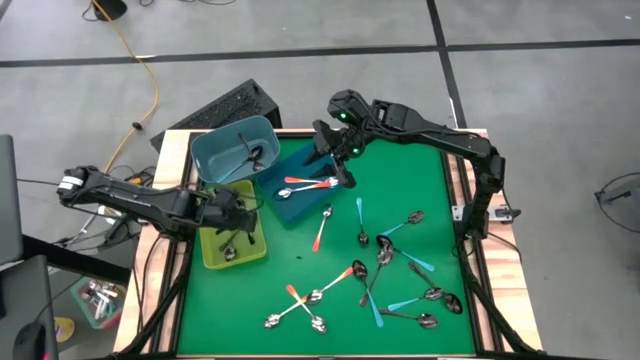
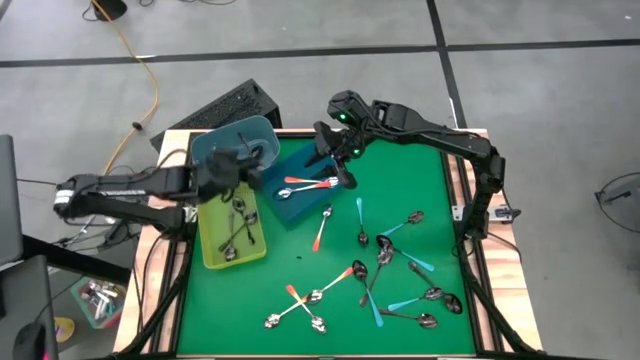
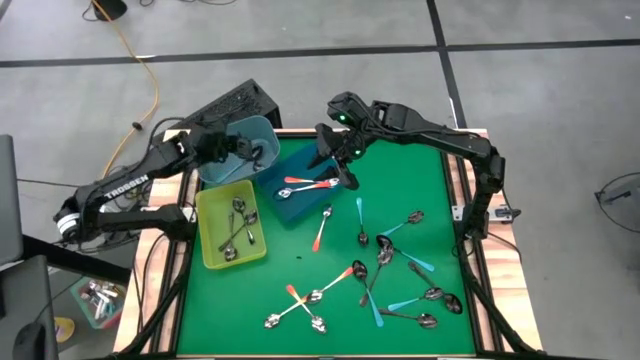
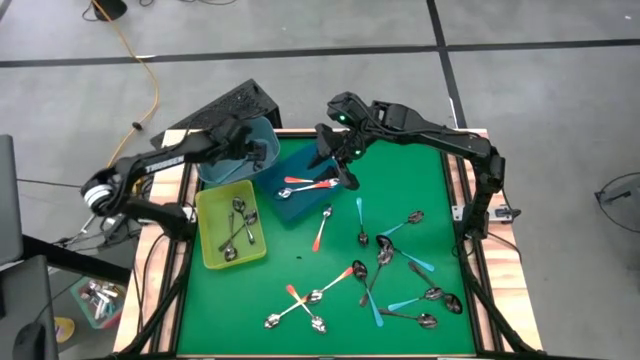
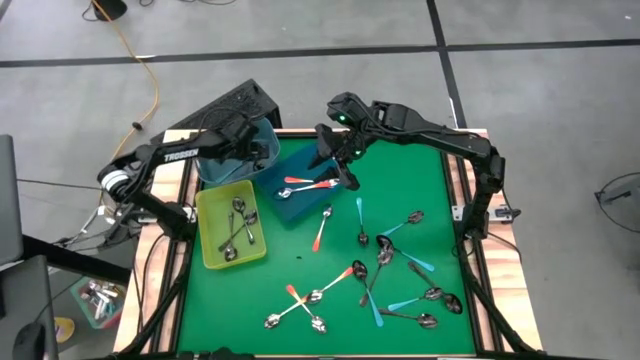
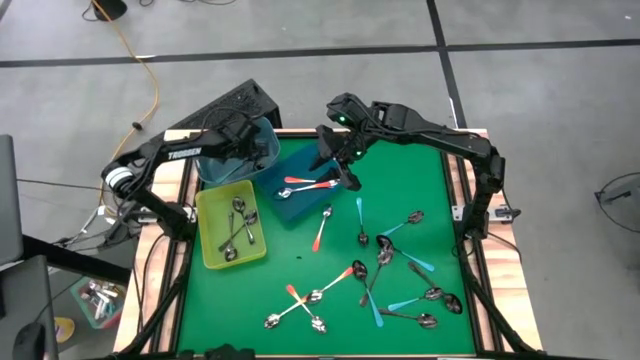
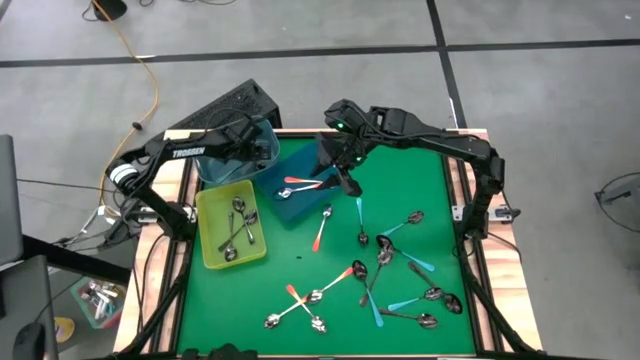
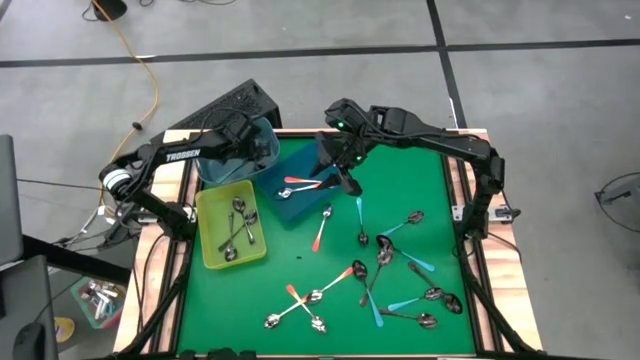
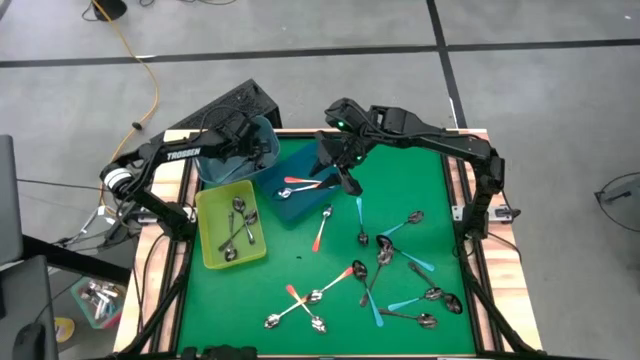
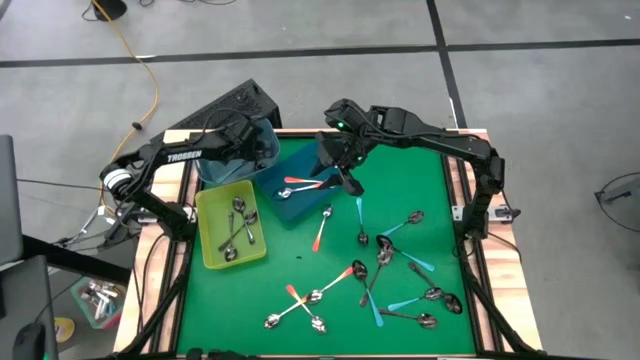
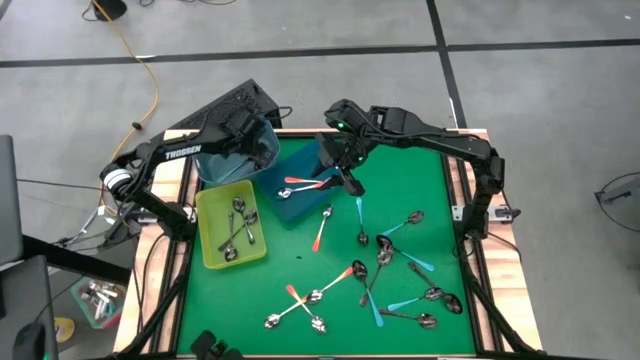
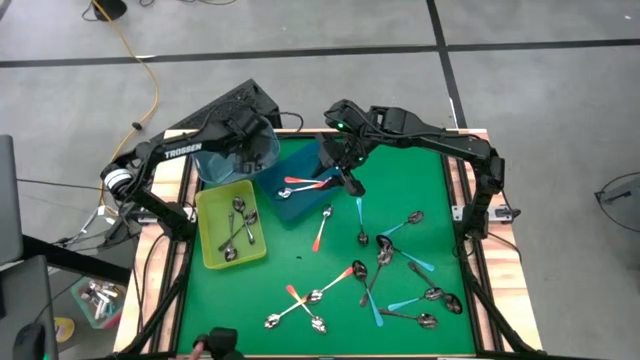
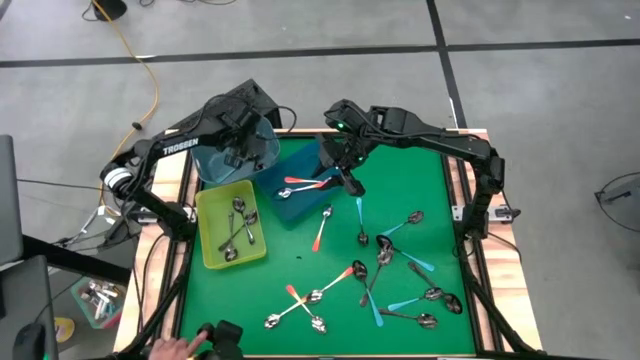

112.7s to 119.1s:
Task: Sort silverware by color (type)
Put the black spoon into the green bin

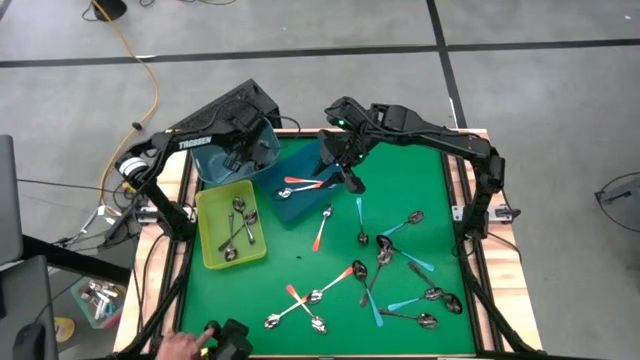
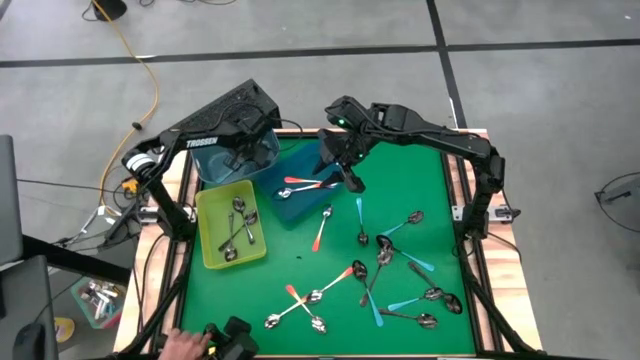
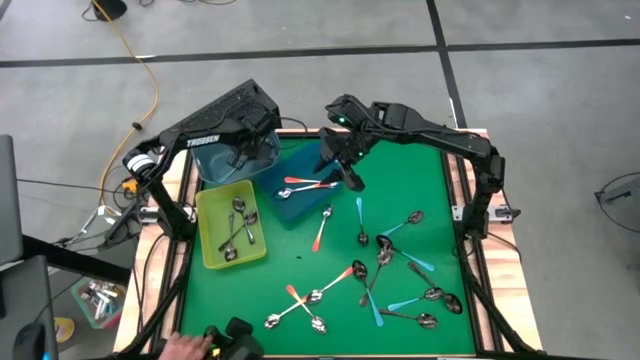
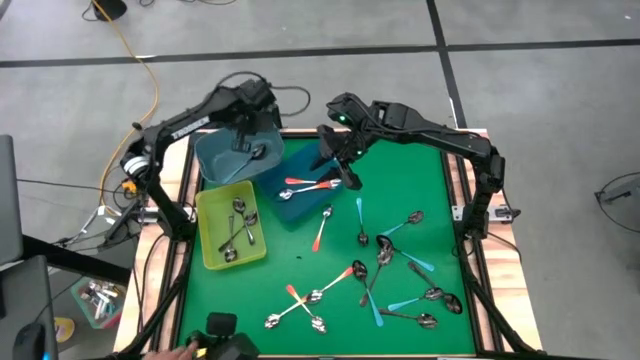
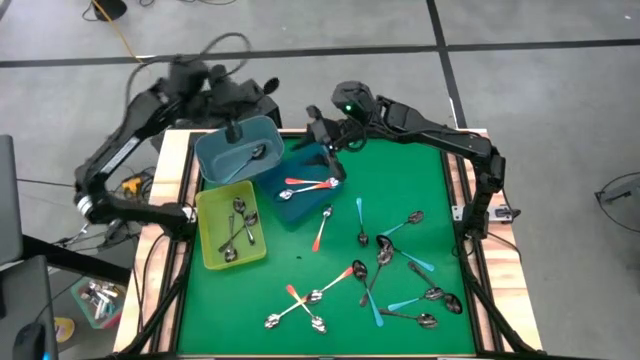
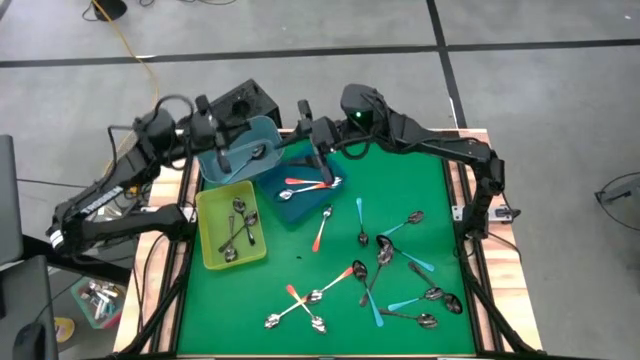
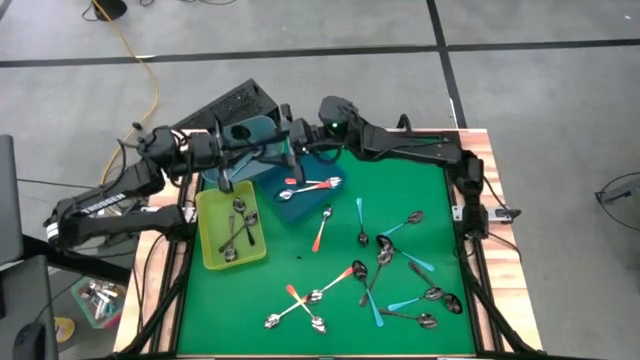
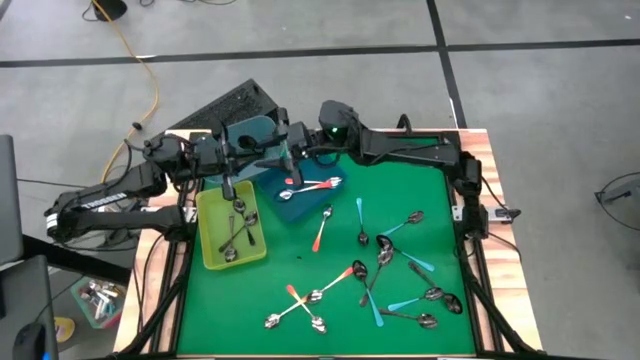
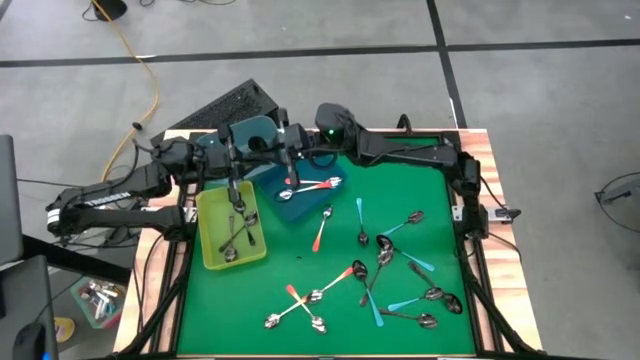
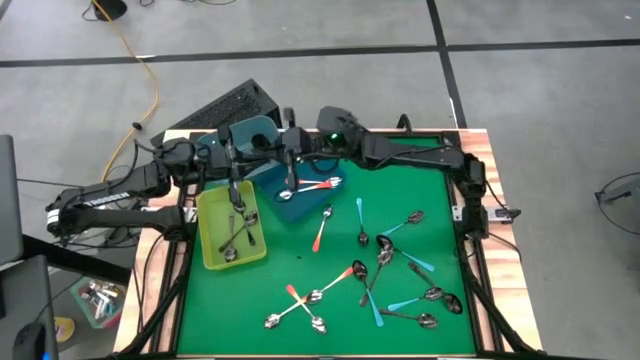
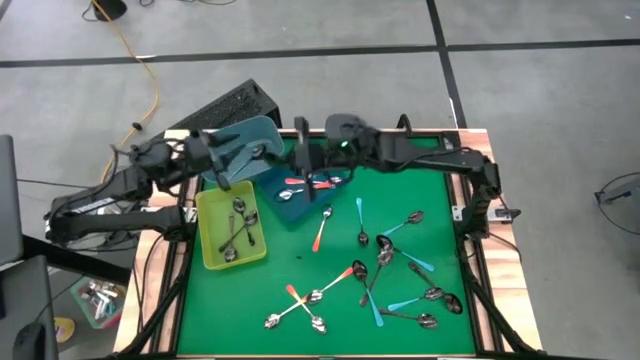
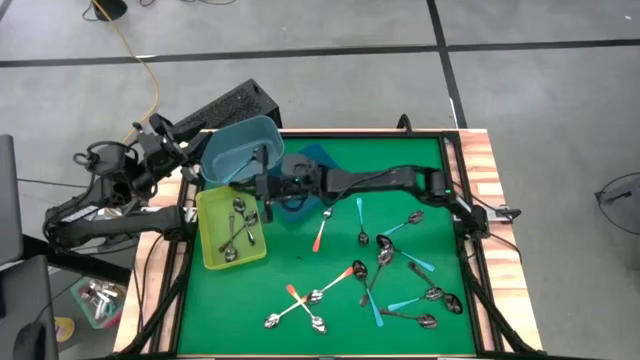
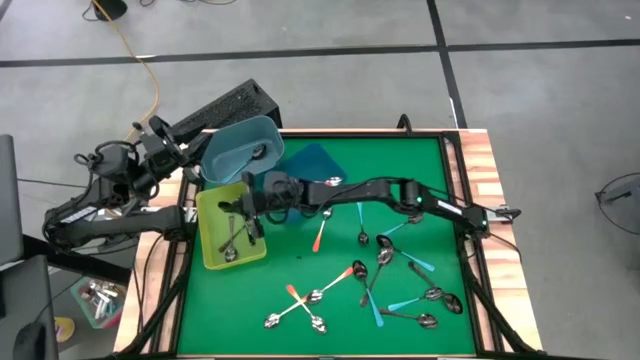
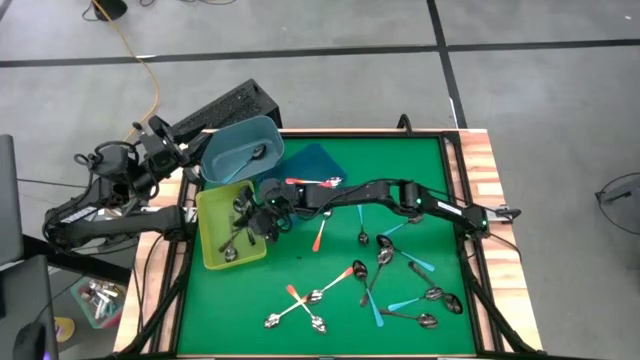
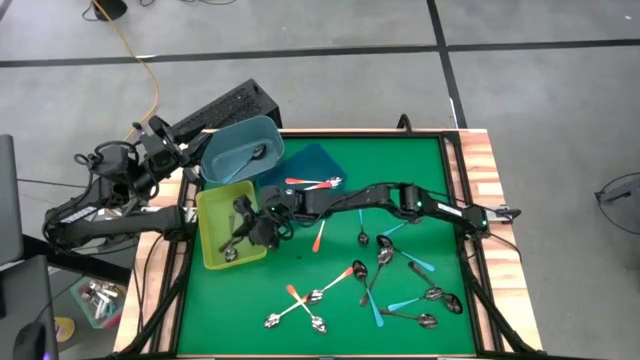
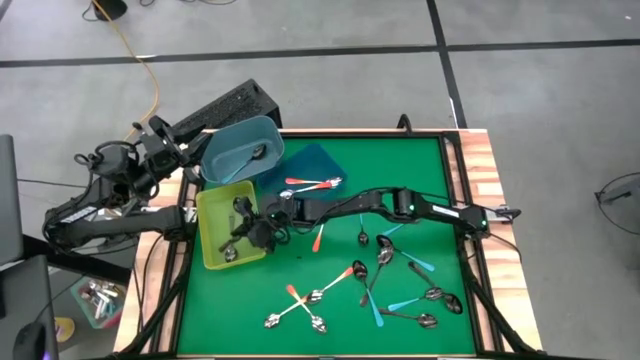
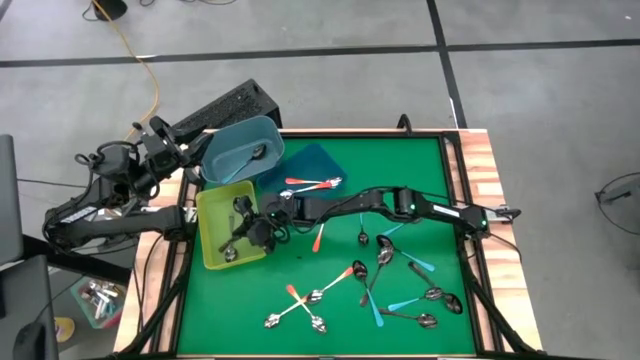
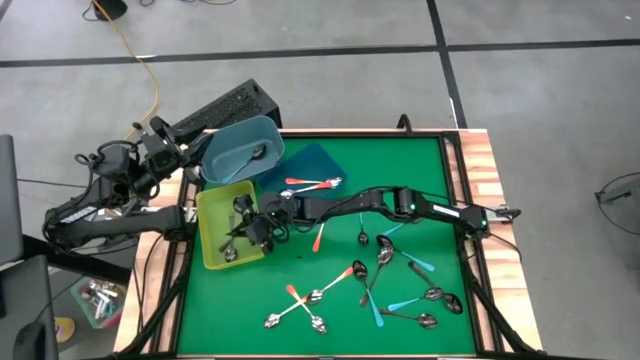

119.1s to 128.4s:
Put the black spoon into the green bin

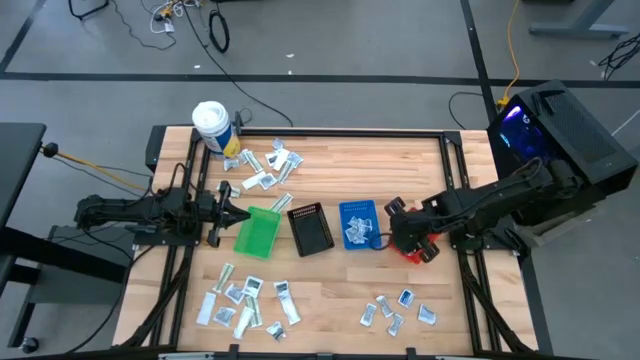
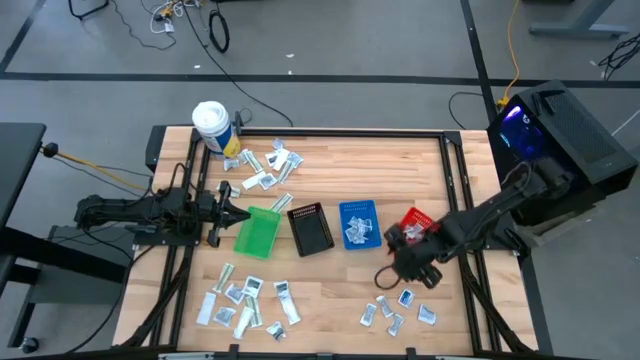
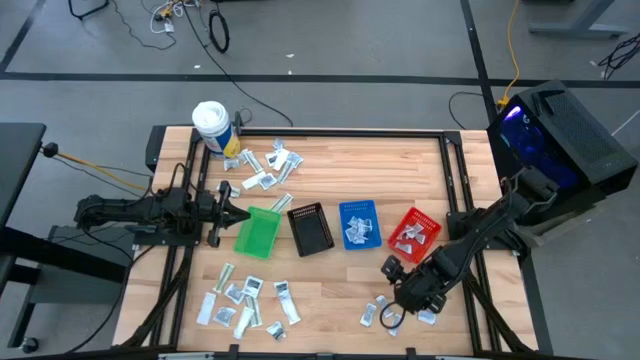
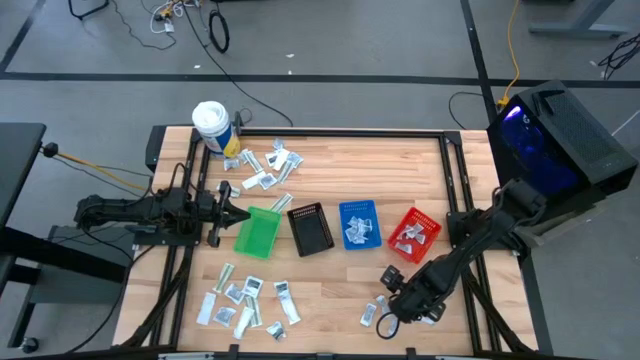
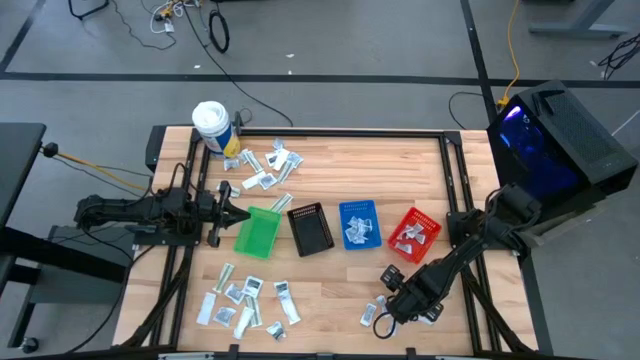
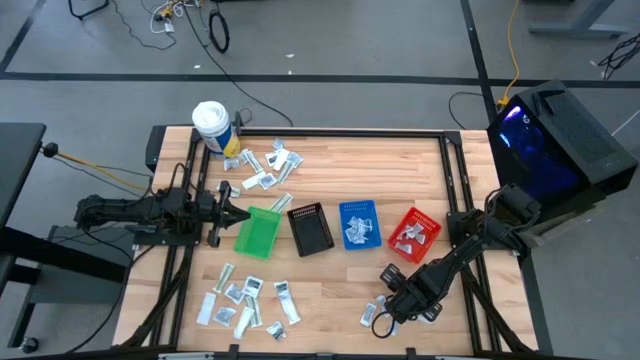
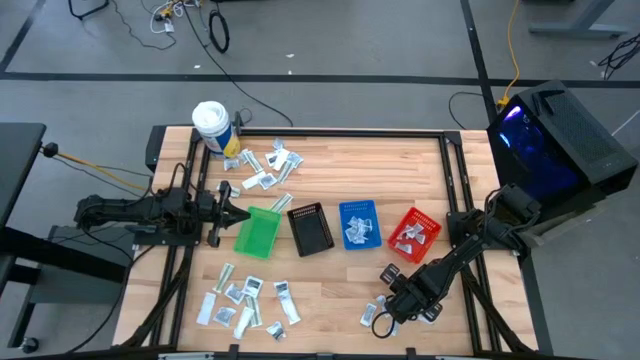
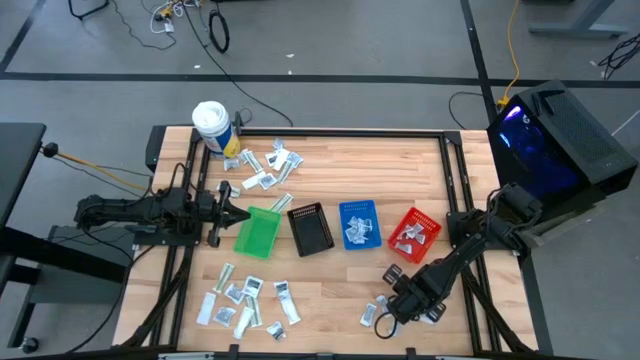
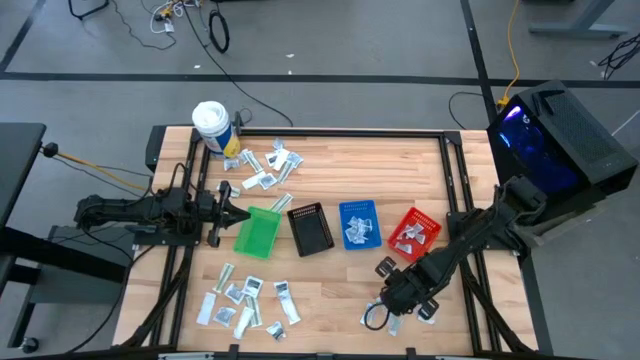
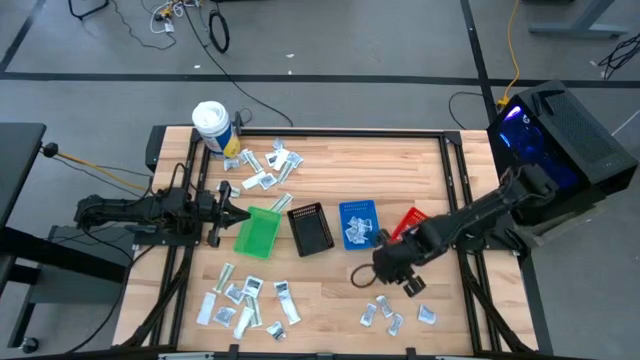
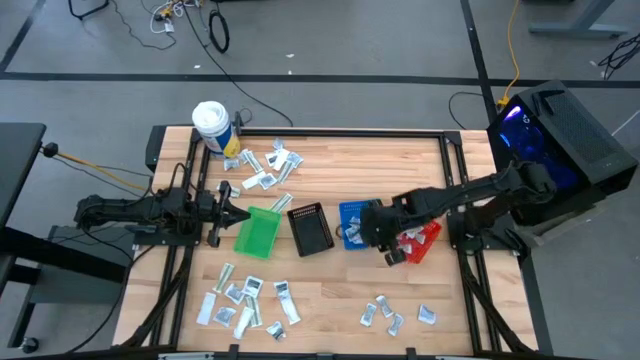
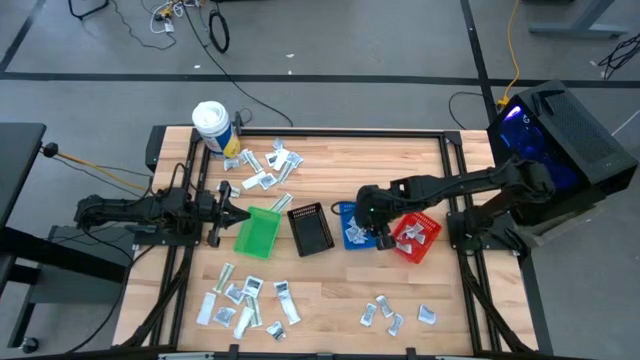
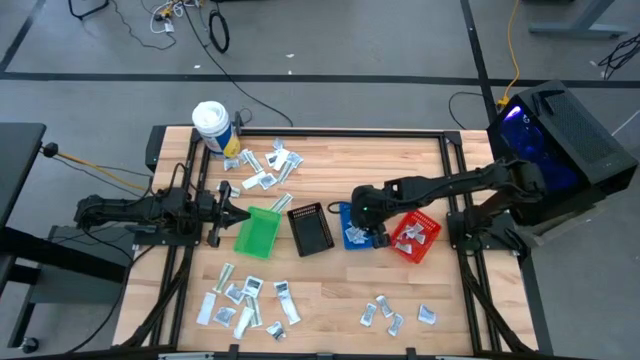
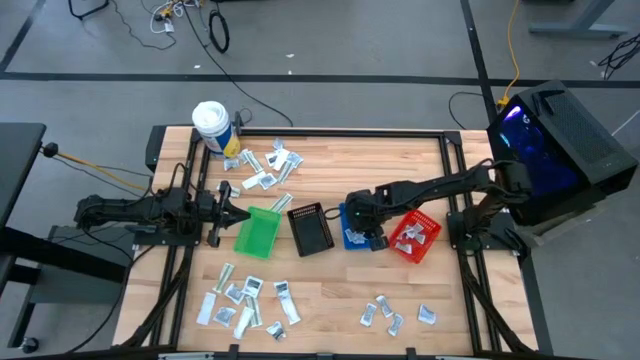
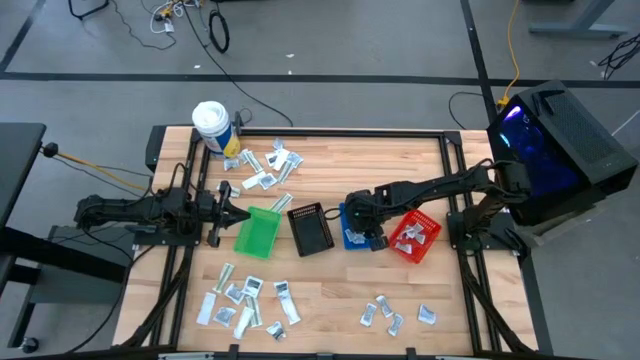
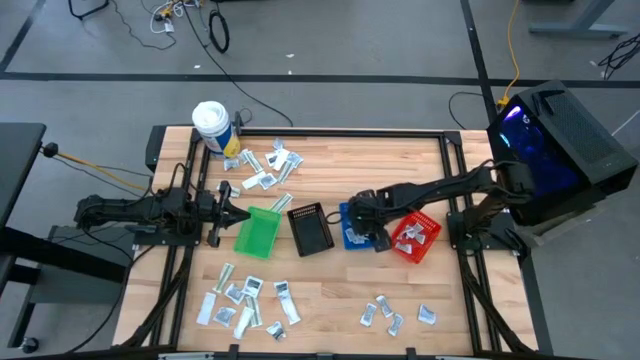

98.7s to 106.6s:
Task: Pick & Place First Aid Supplies
Put the alcohol pad into the blue basket
